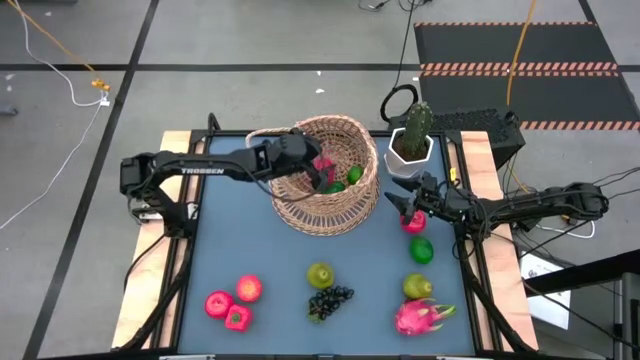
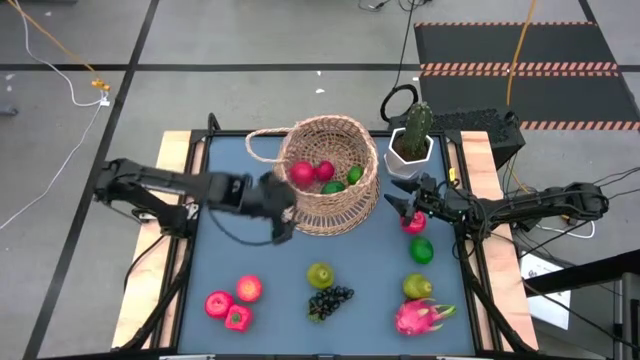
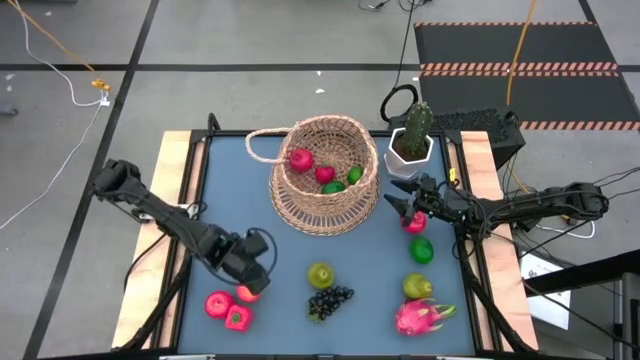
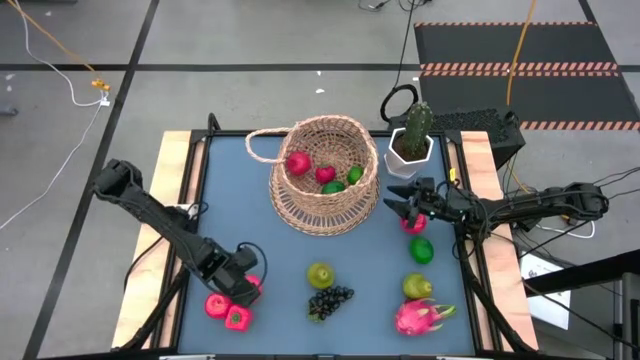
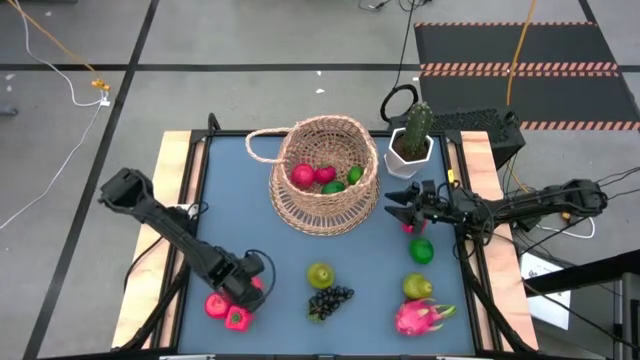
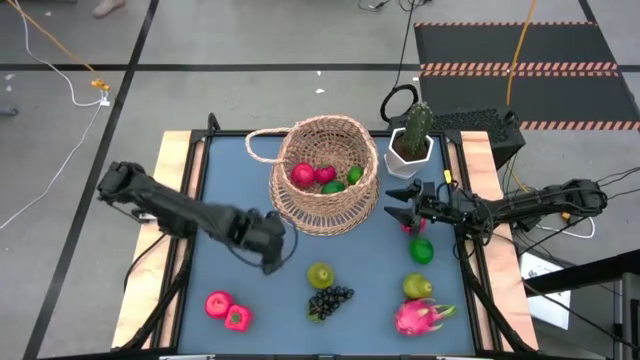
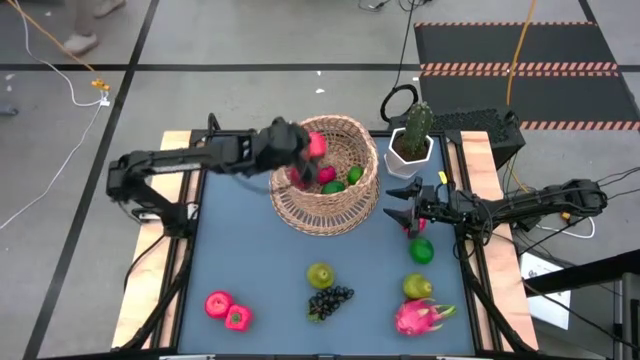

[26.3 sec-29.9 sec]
Task: Build produce basket
Put the red apple into the brown basket

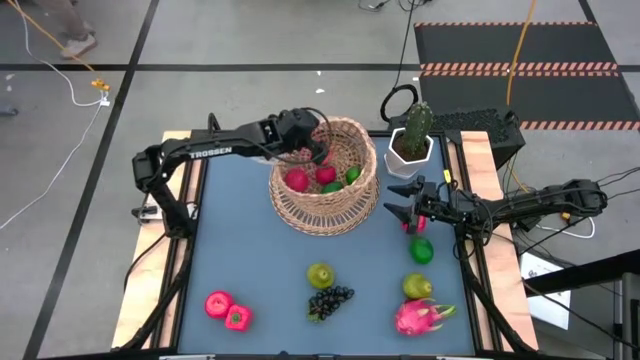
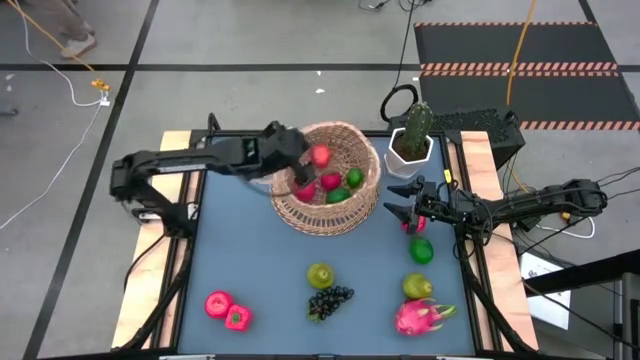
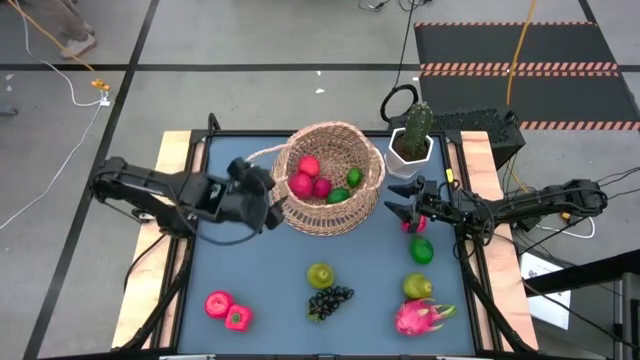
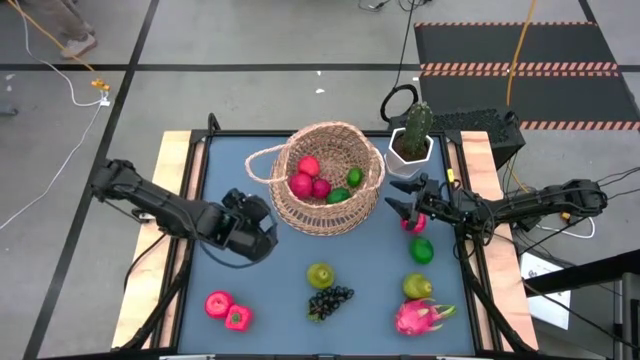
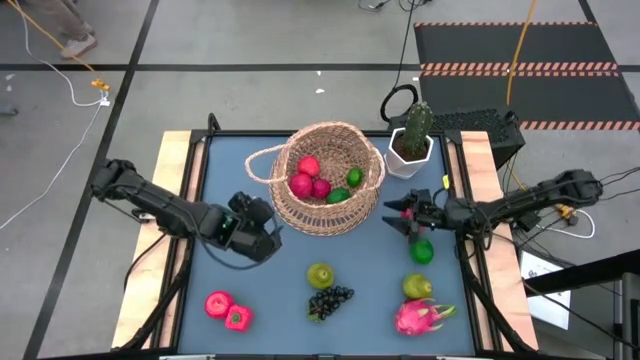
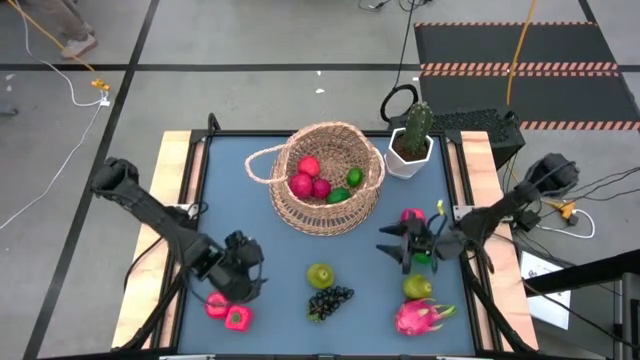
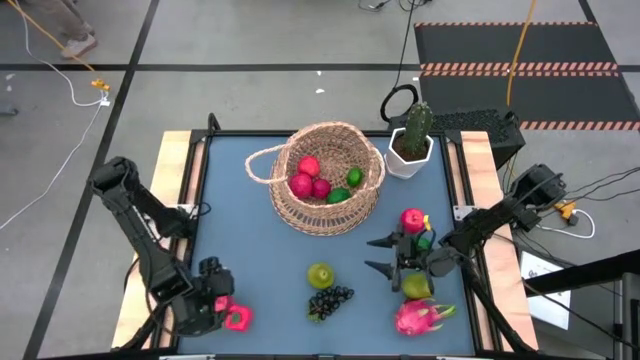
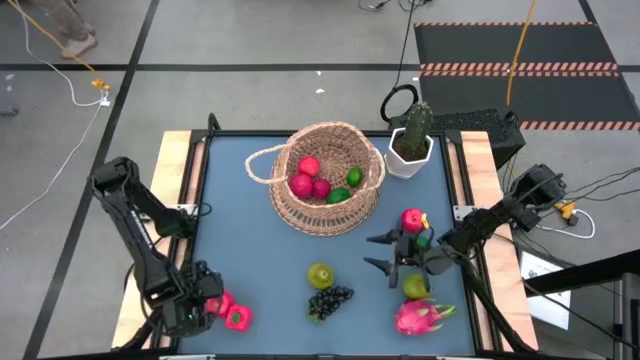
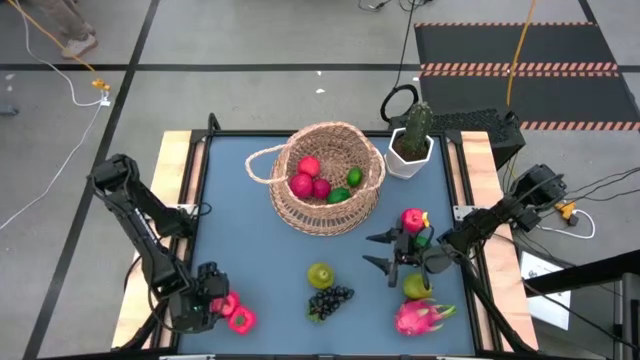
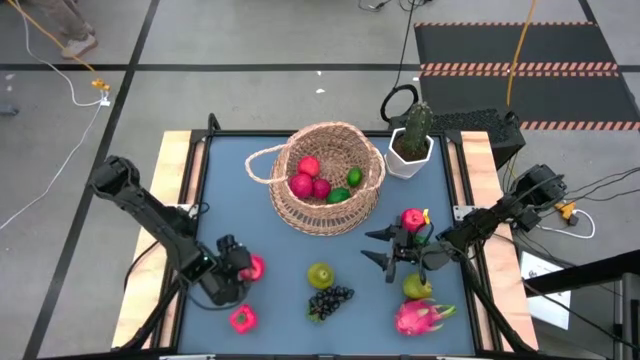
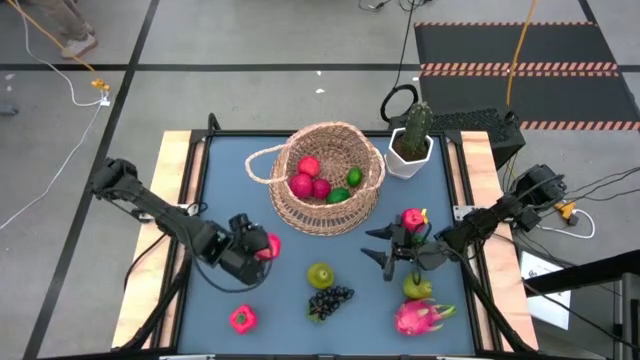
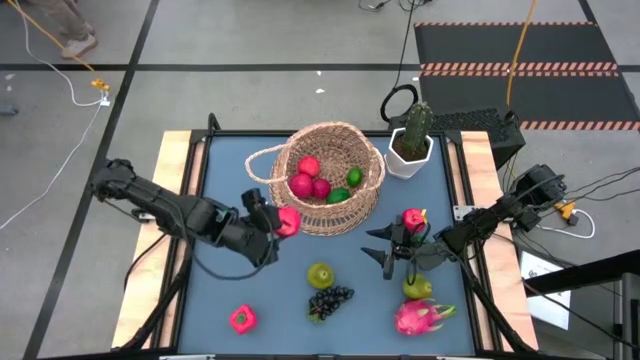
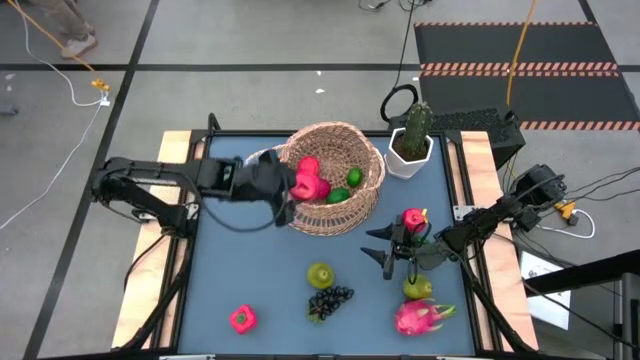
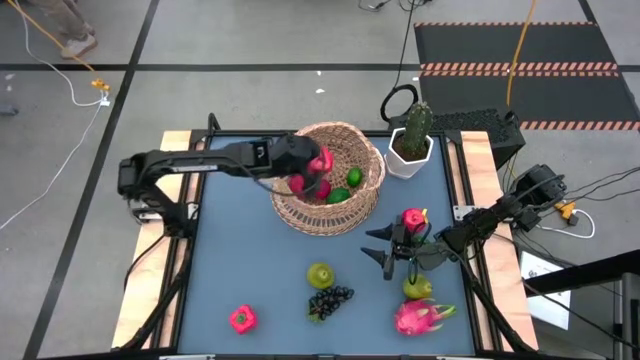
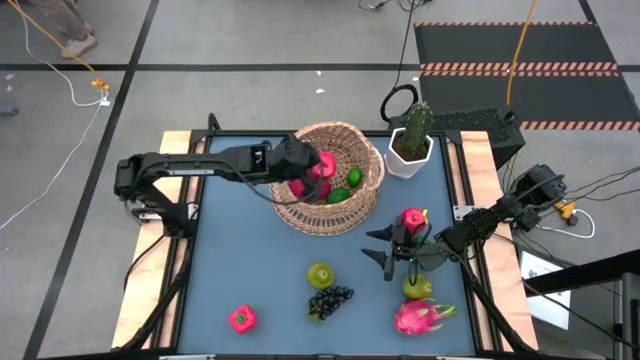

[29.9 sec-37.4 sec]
Put the red apple into the brown basket

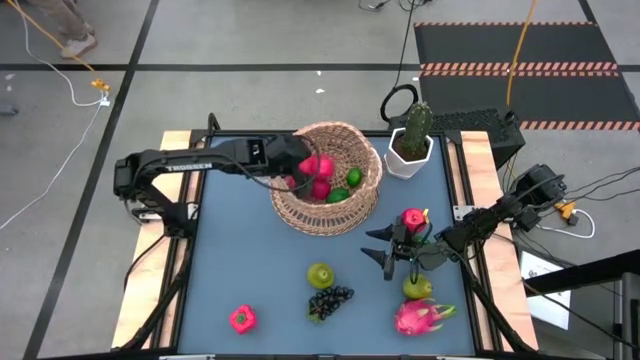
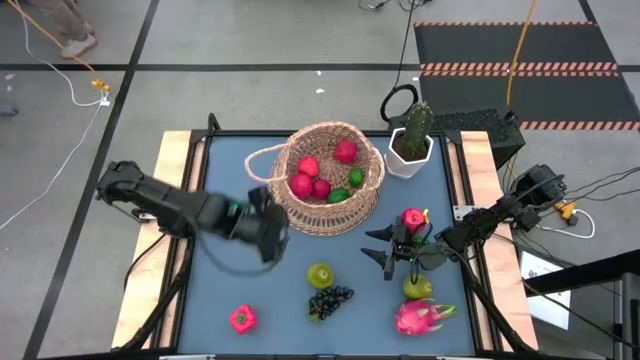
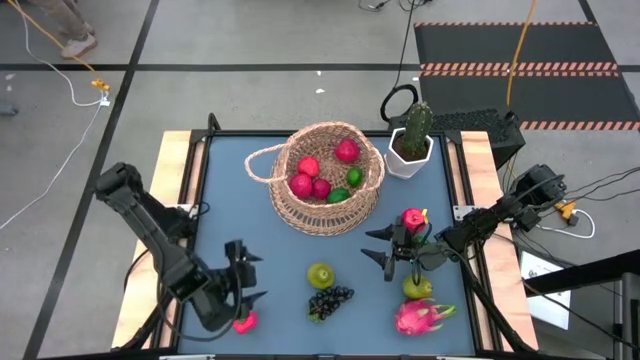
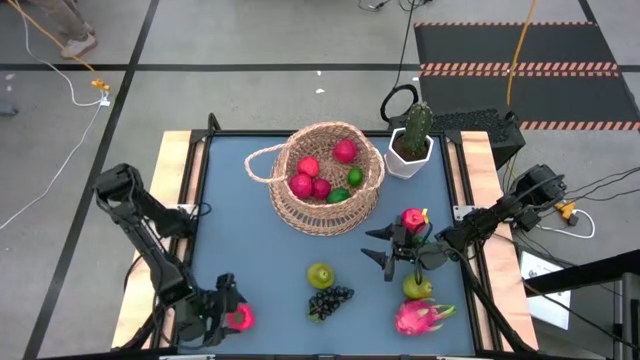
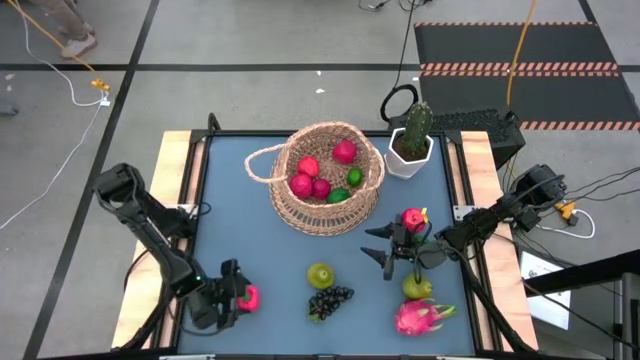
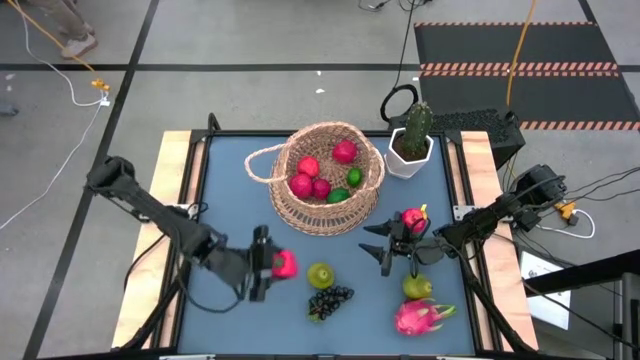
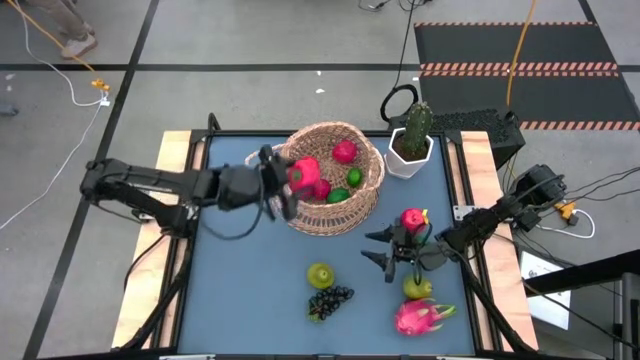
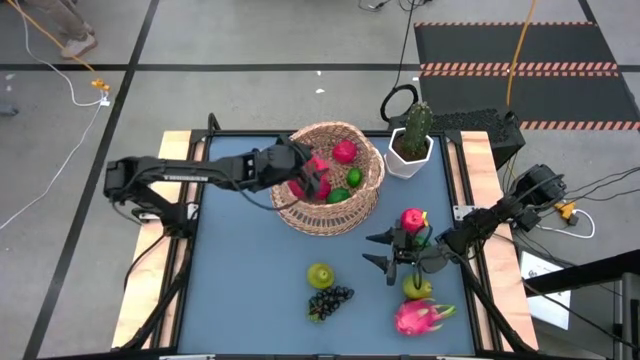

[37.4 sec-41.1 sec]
Put the red bell pepper into the brown basket

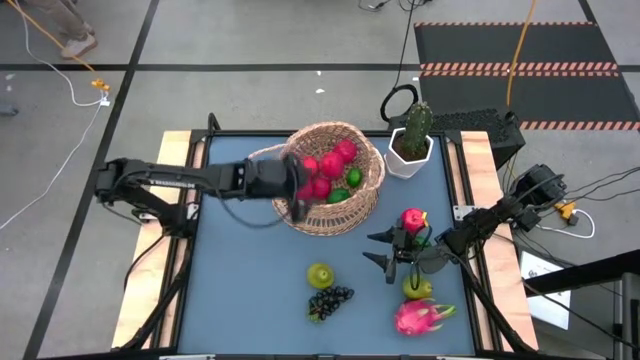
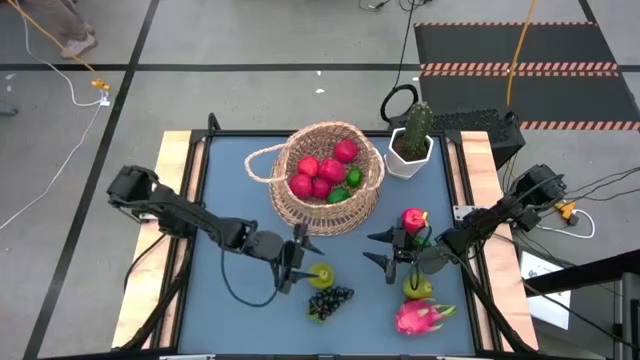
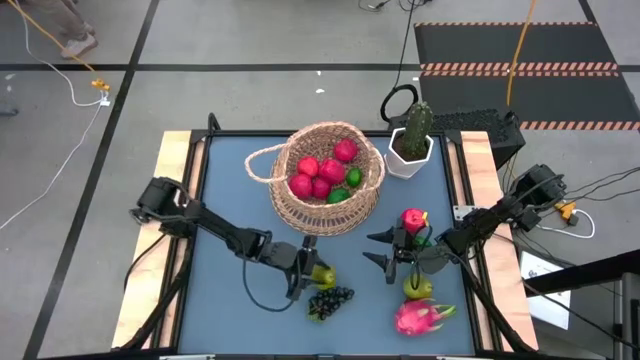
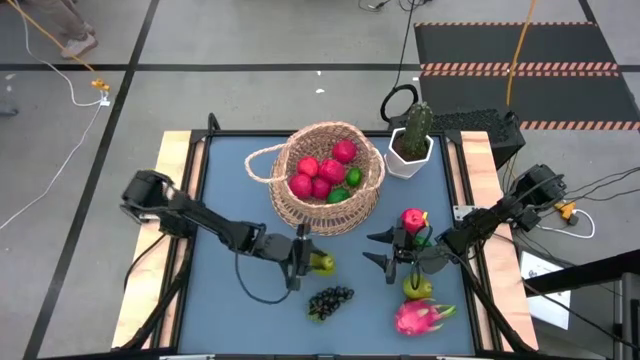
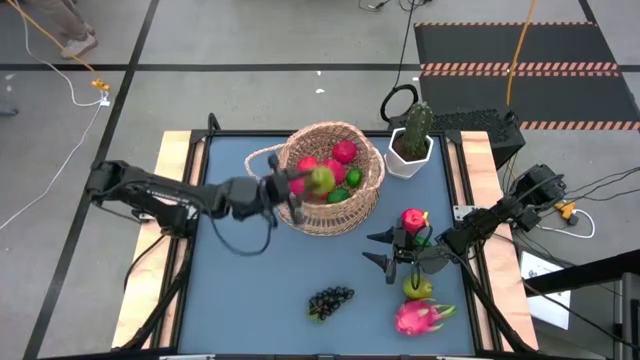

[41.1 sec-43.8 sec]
Put the green pear into the brown basket

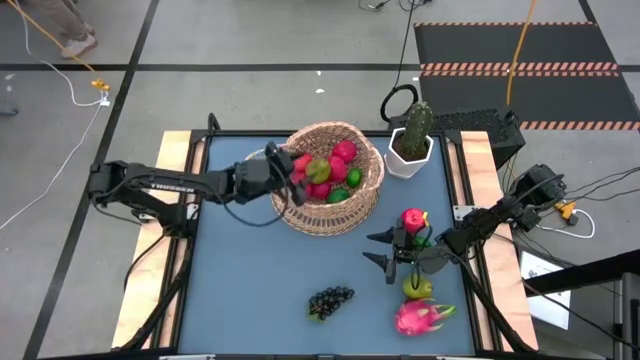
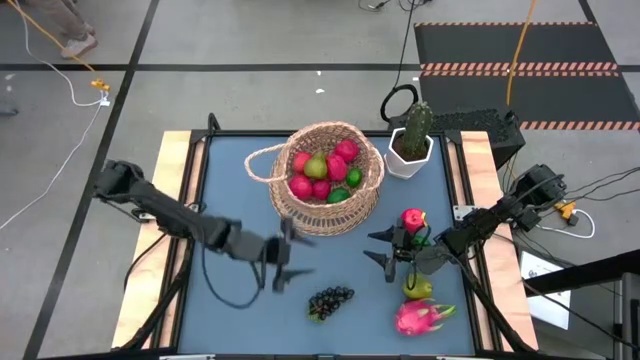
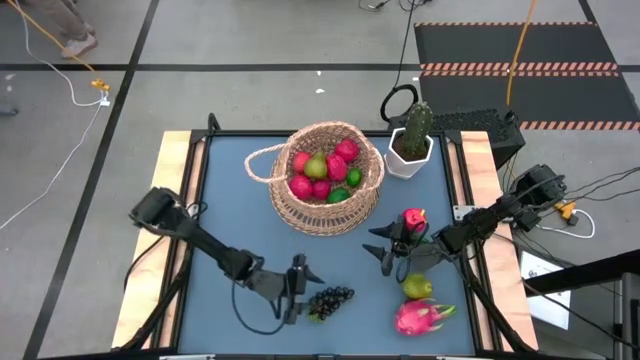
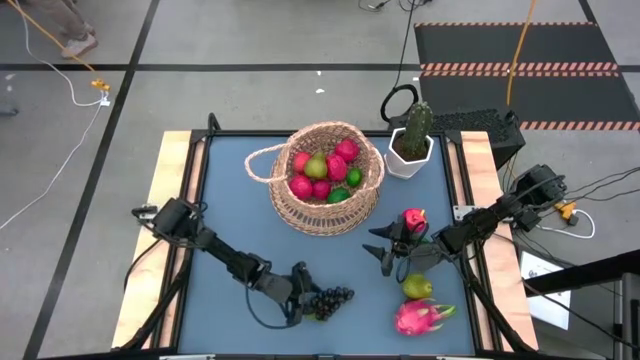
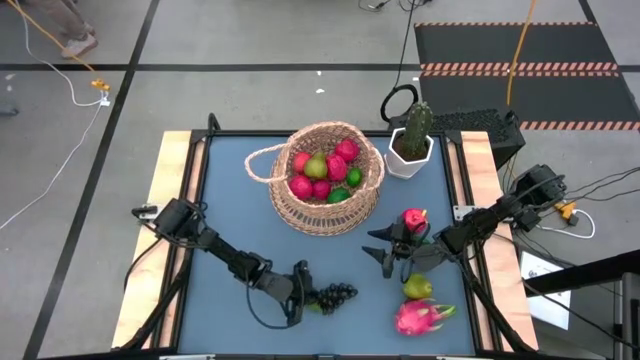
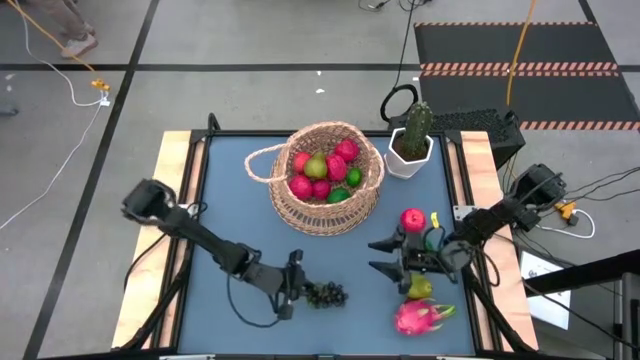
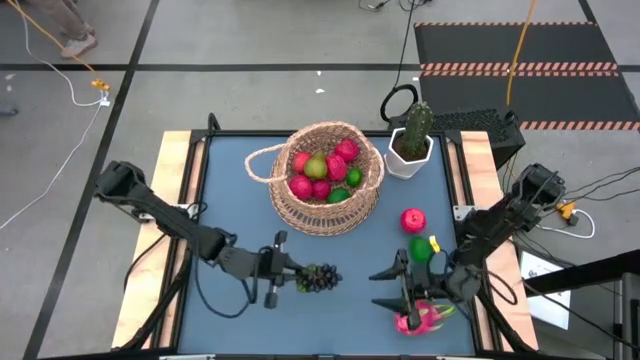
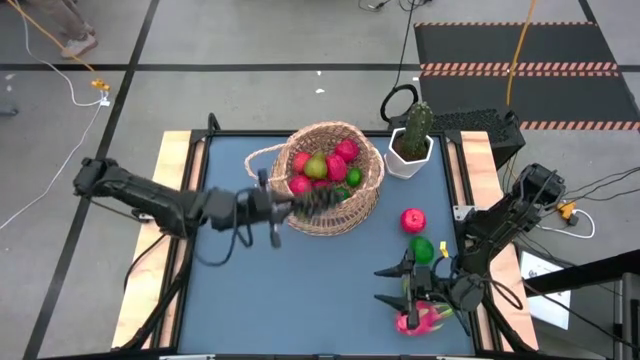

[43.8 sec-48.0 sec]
Put the black grapes into the brown basket
